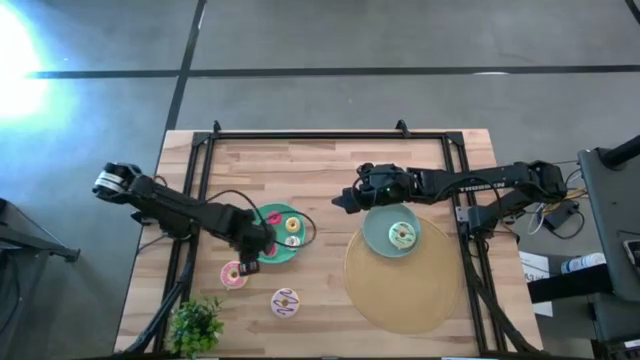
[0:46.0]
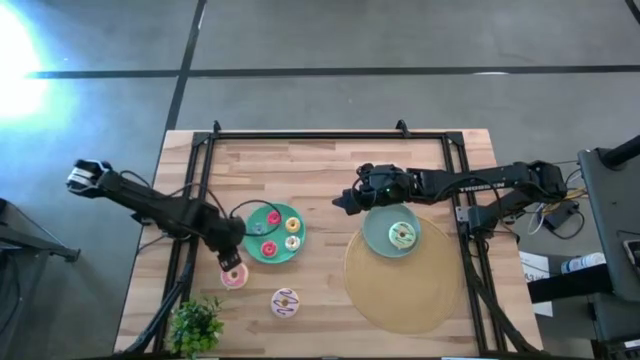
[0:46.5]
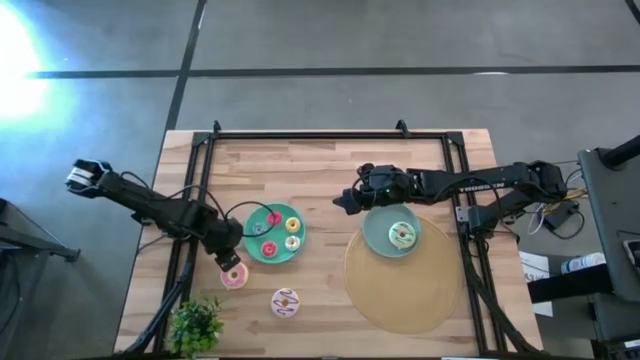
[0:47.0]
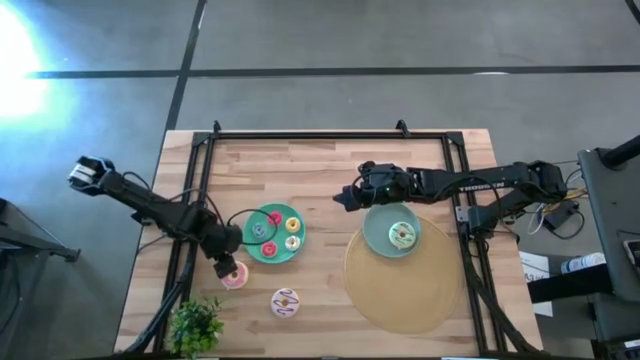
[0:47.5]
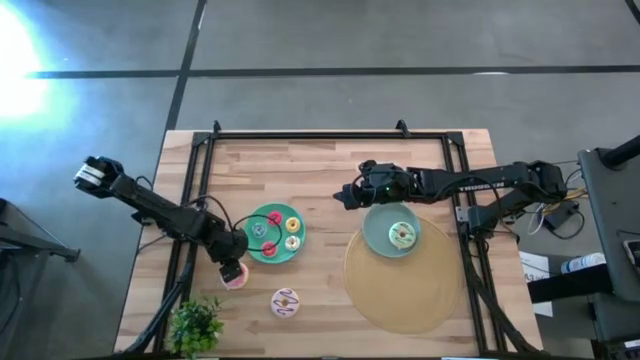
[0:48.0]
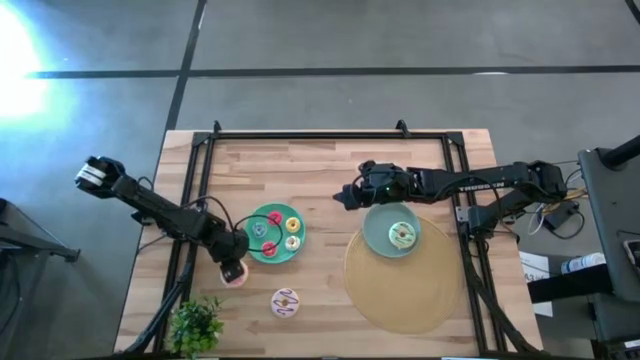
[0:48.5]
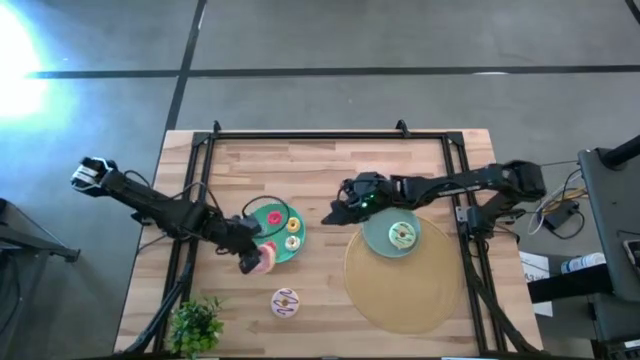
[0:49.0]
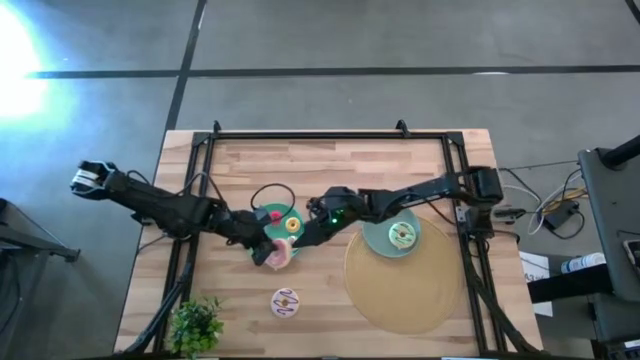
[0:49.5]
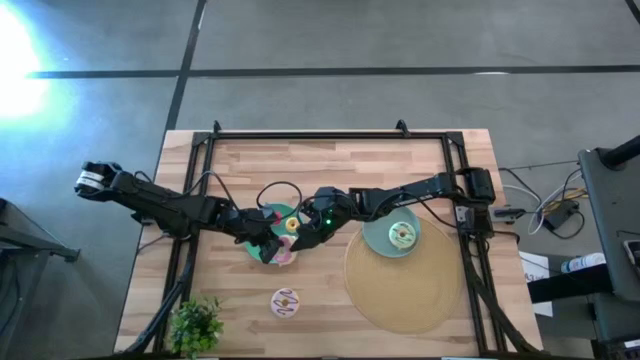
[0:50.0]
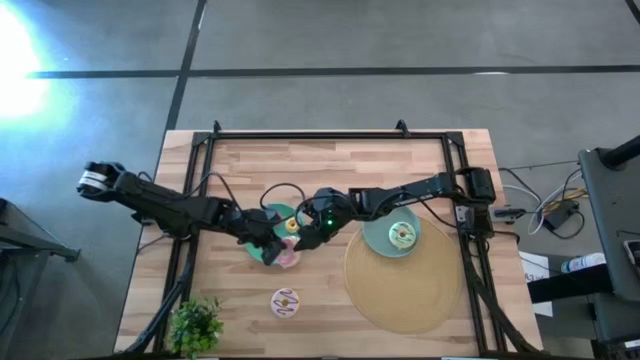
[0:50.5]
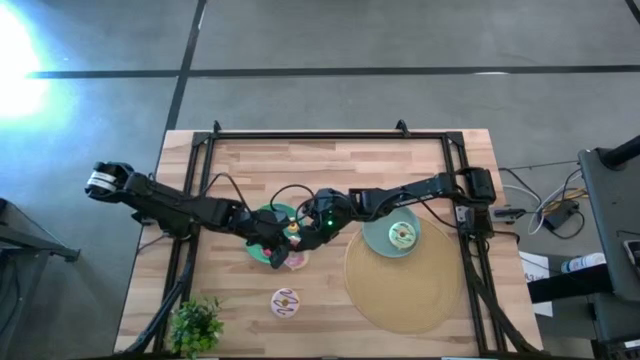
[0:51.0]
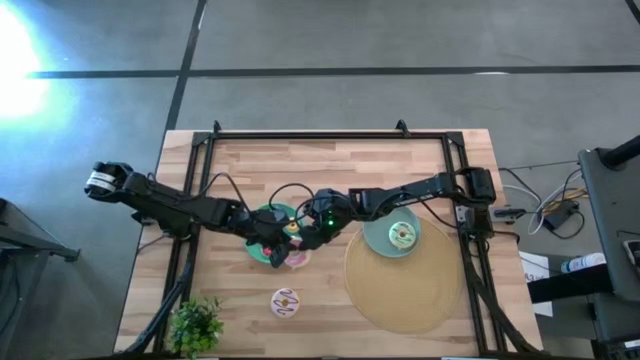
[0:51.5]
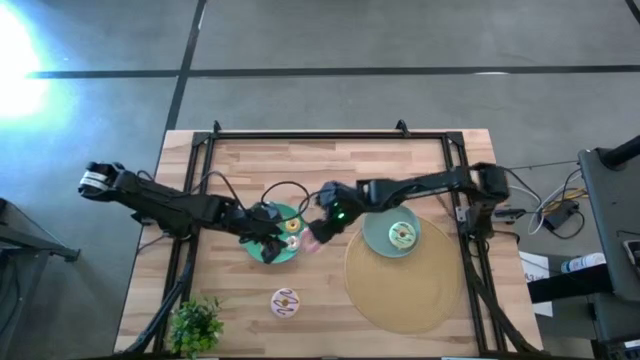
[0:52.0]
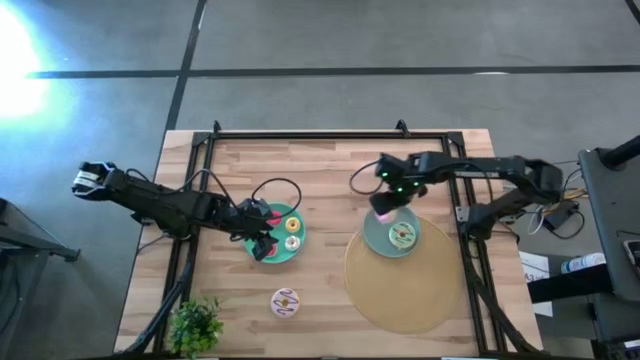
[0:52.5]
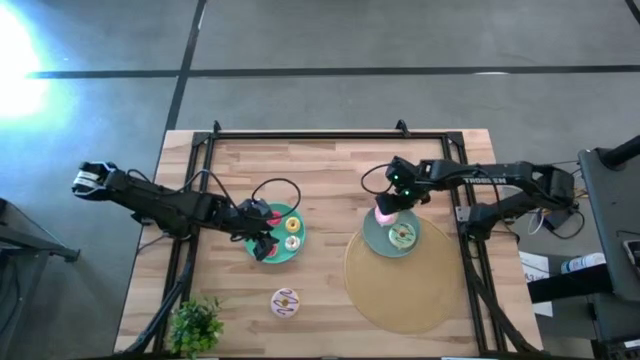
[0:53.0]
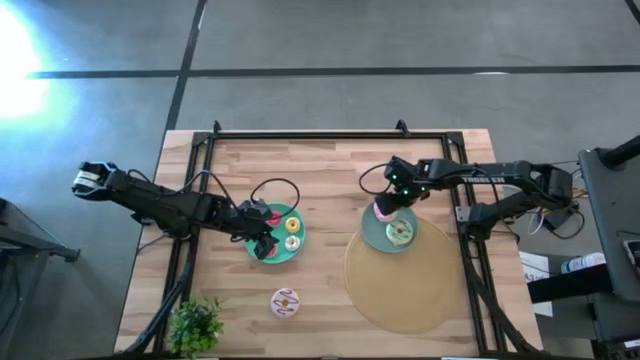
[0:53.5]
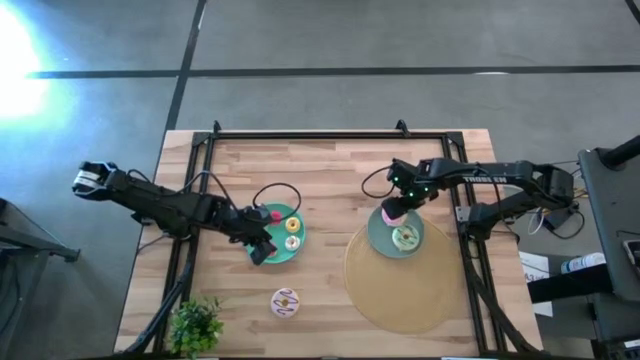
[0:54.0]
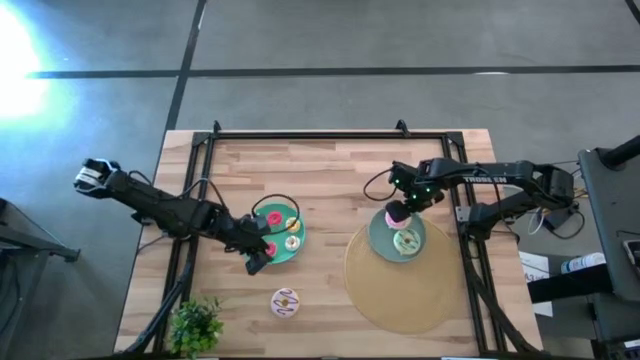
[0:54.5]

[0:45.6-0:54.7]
Task: Pick & Place donuts
Put the large pink donut on the gray plate

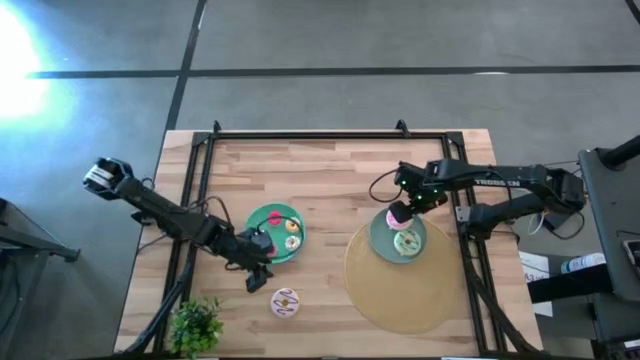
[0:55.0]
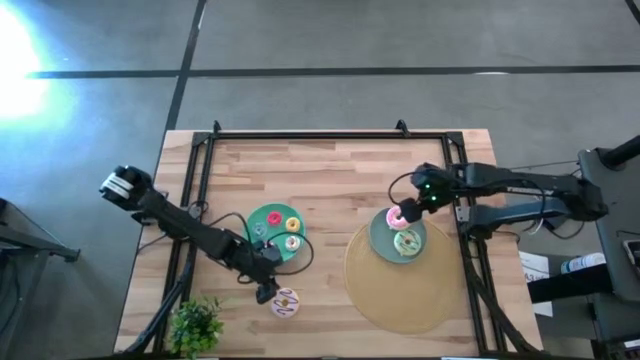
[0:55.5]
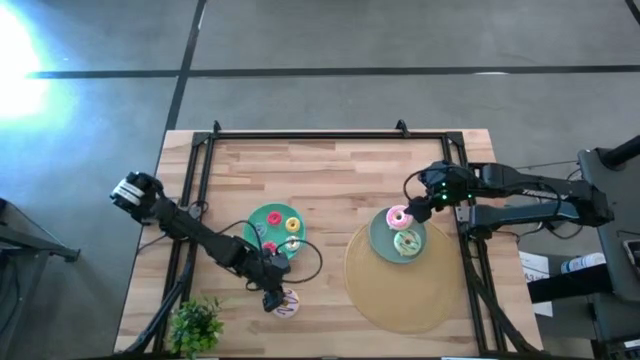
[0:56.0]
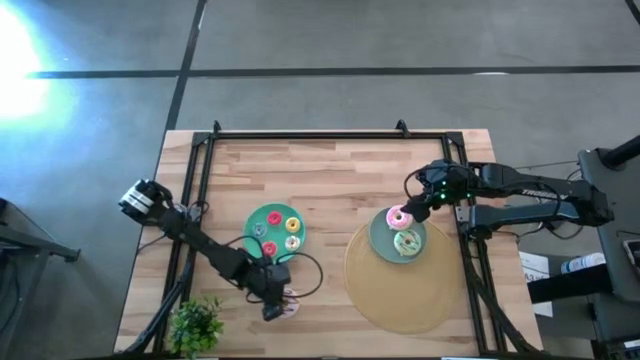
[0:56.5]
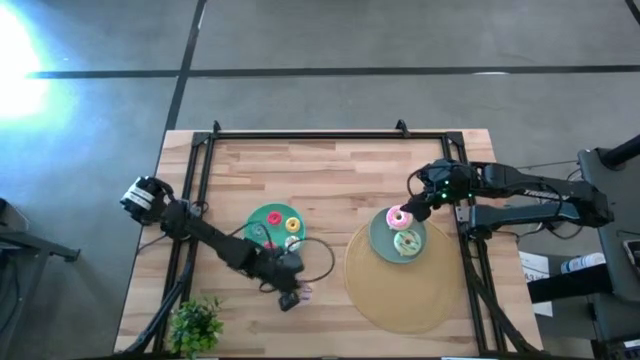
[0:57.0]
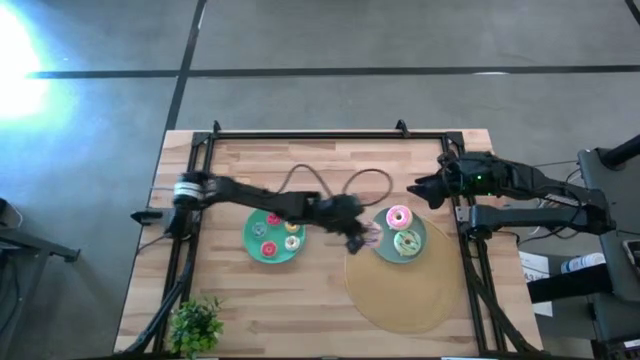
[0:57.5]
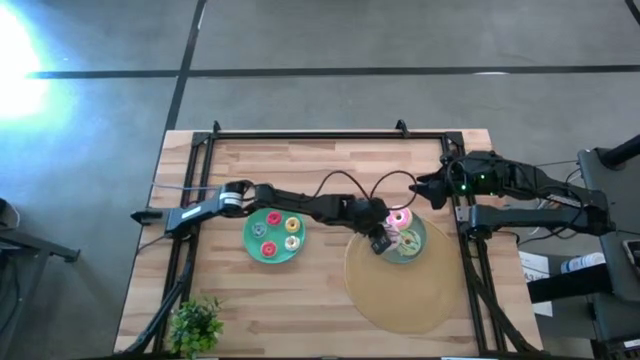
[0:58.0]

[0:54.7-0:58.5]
Put the large purple donut on the gray plate

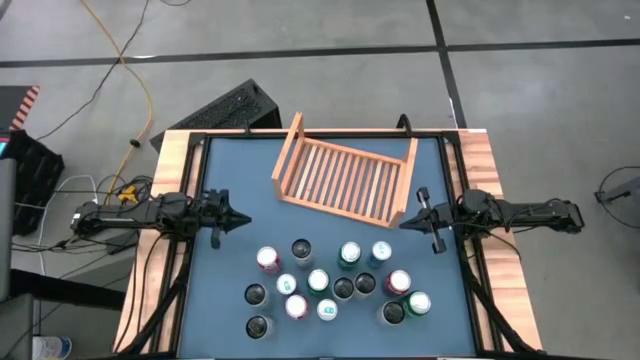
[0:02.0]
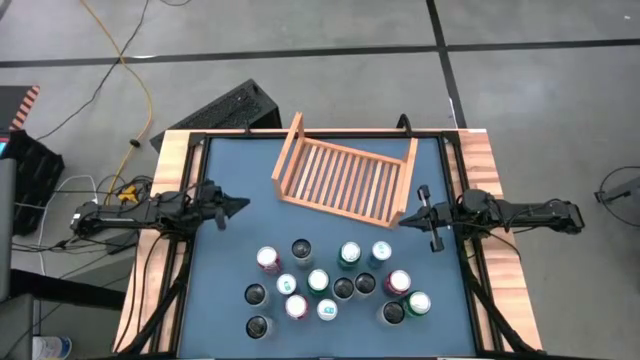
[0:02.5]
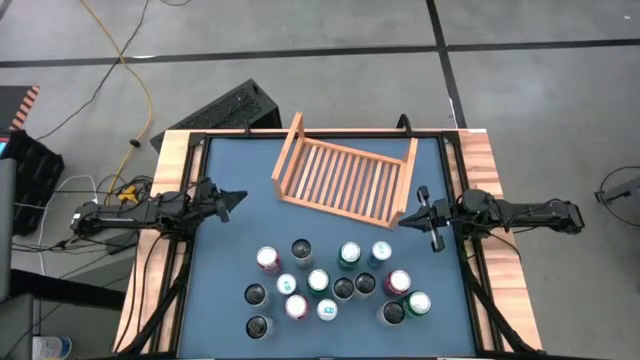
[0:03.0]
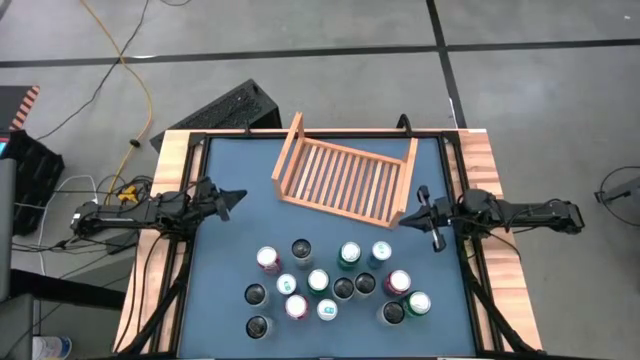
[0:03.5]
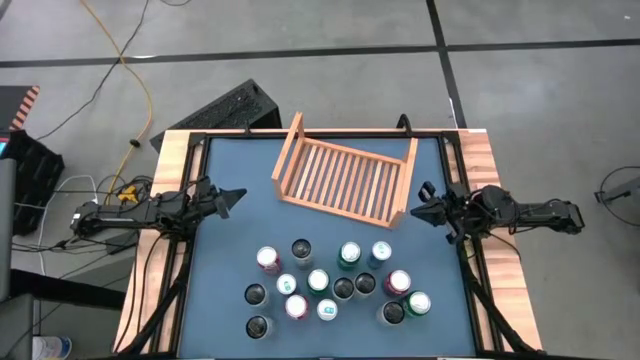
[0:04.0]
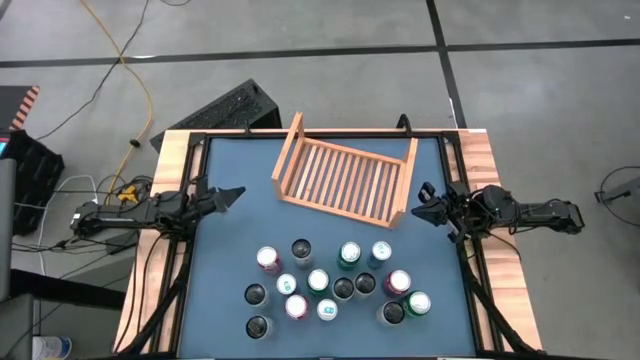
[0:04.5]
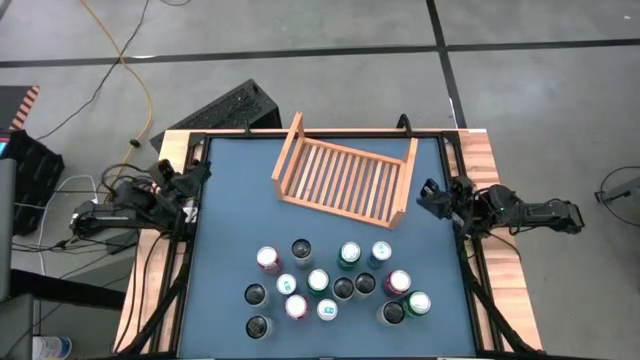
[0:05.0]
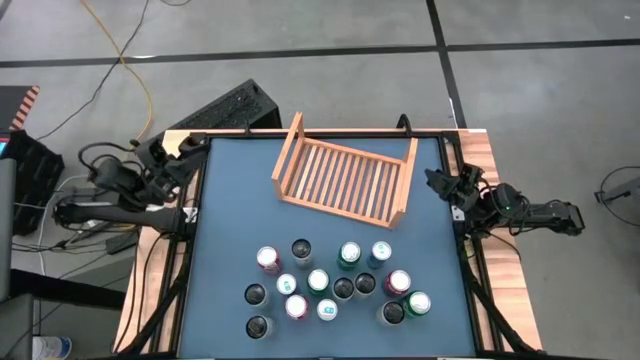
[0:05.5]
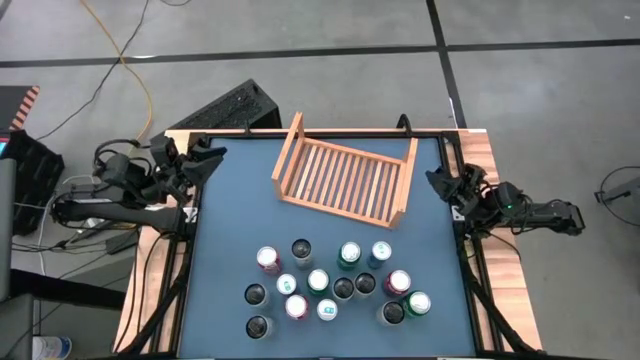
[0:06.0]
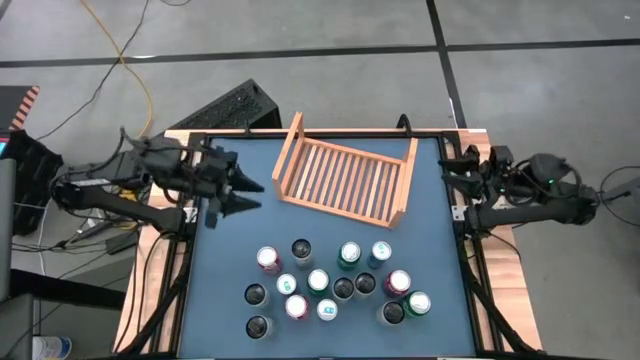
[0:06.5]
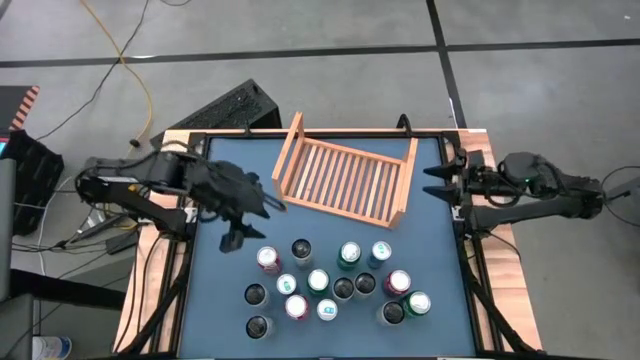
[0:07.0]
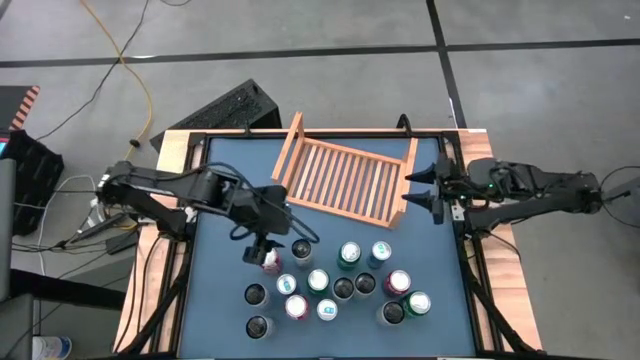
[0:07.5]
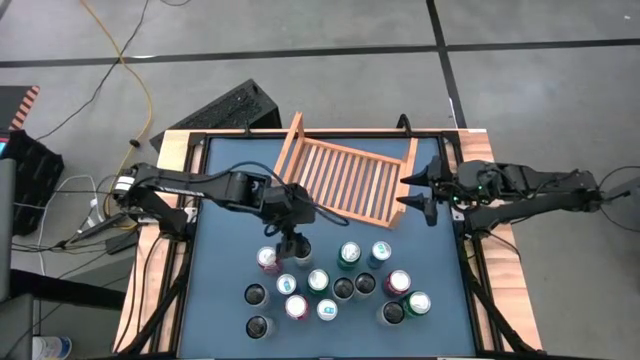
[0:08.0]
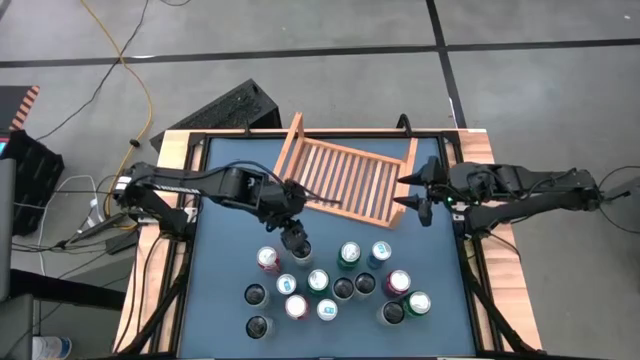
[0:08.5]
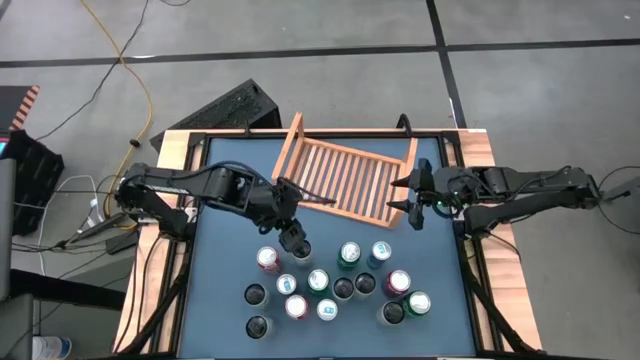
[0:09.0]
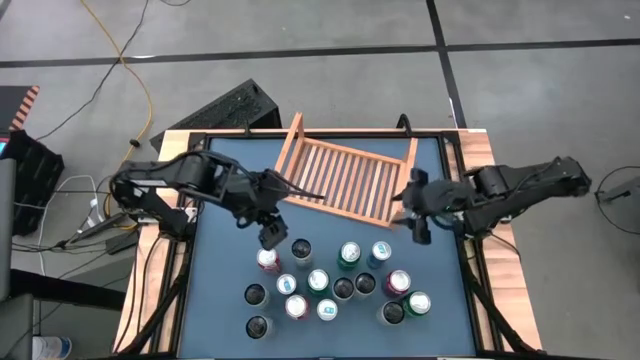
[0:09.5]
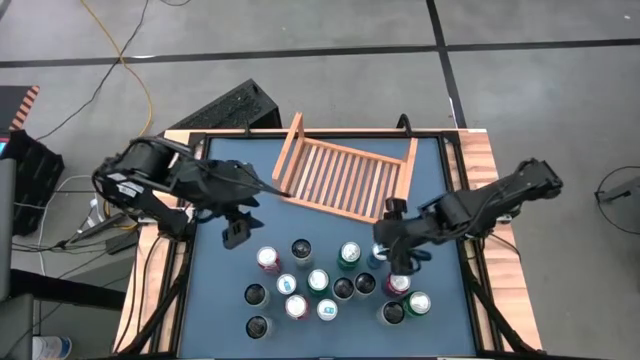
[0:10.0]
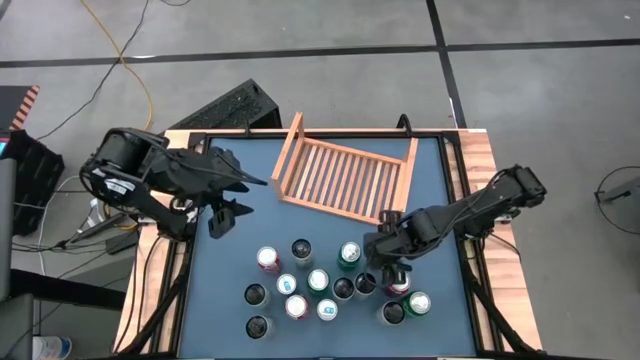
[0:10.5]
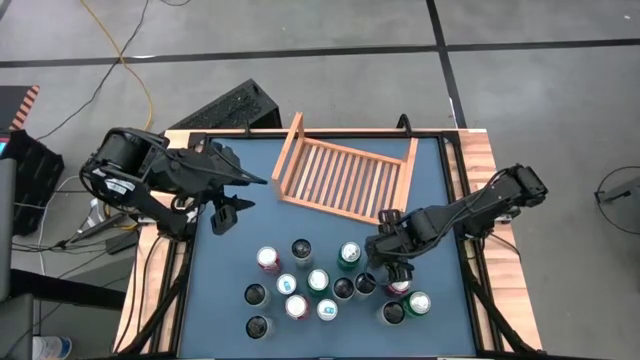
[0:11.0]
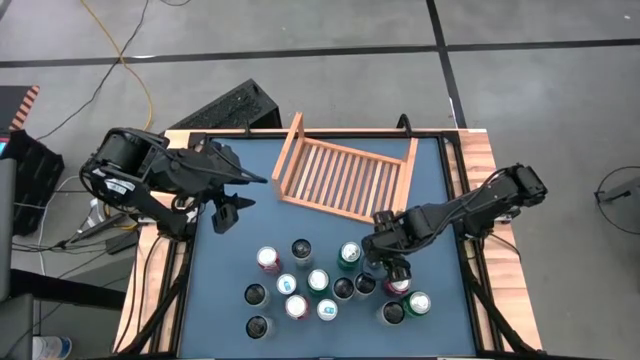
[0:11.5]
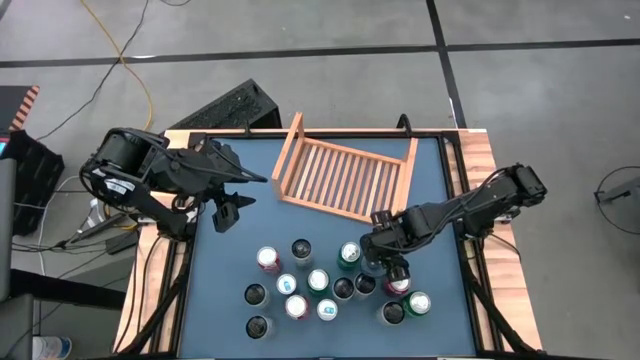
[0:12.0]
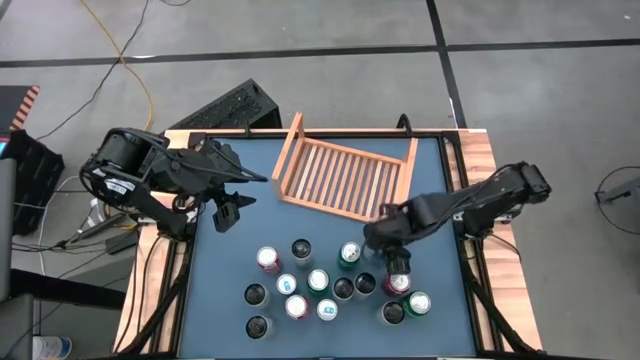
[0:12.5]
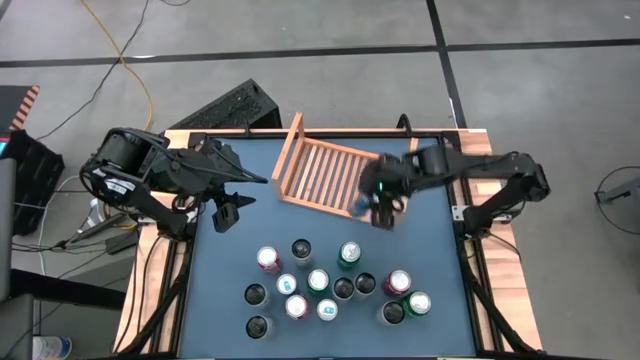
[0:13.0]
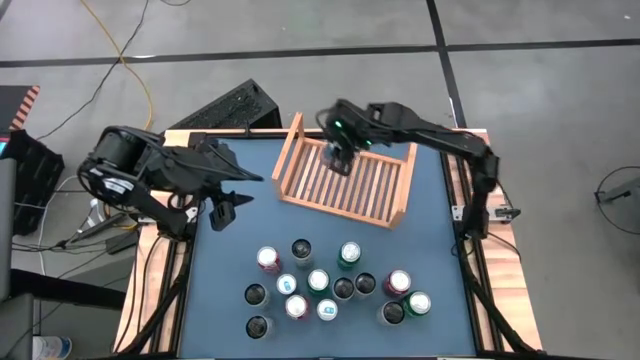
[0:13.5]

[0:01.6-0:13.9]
Task: Place canned beverage on shelf
Put the blue soda can on the shelf
